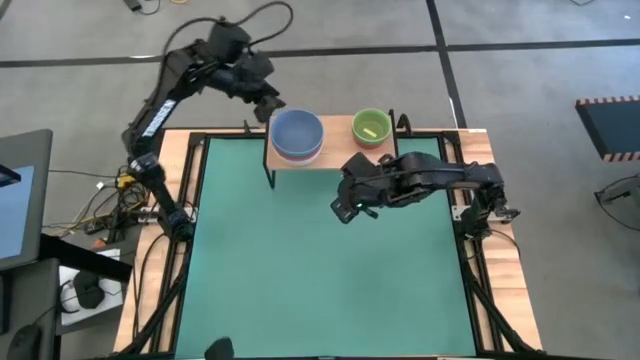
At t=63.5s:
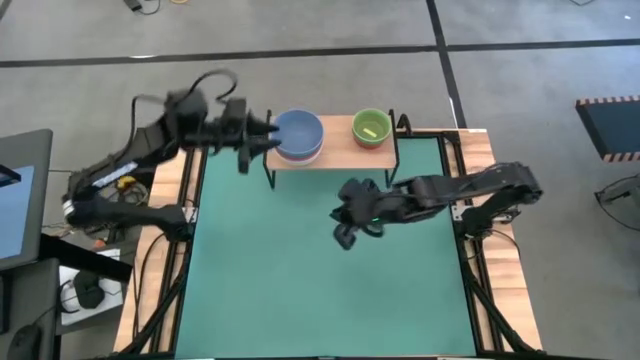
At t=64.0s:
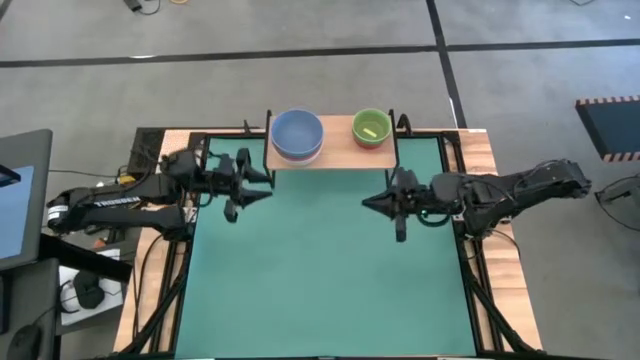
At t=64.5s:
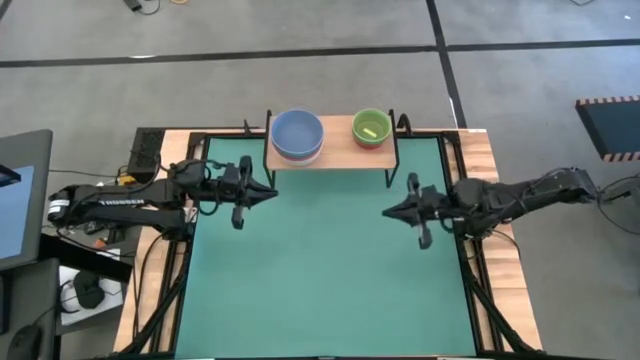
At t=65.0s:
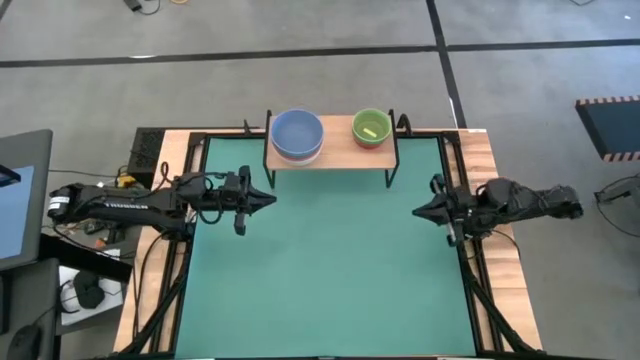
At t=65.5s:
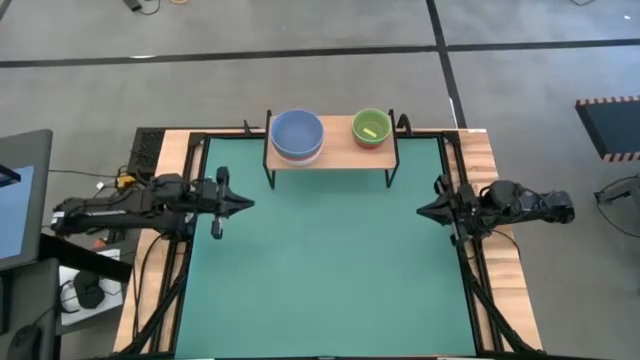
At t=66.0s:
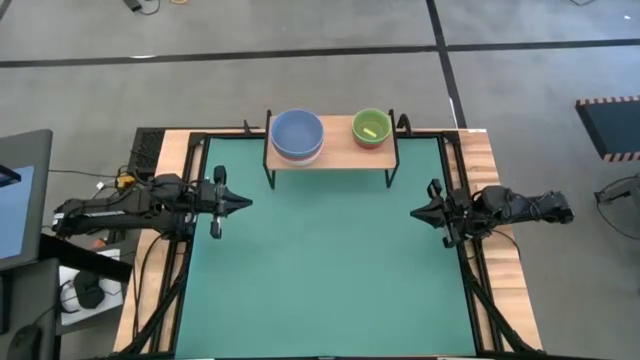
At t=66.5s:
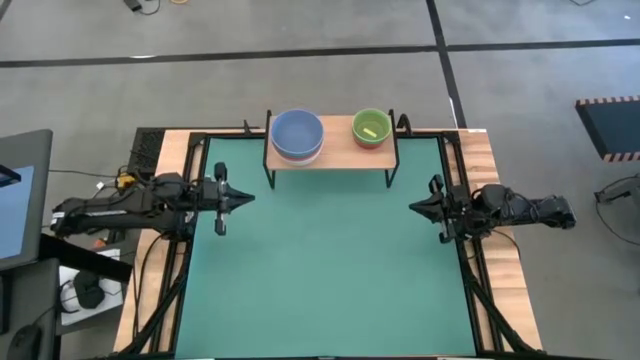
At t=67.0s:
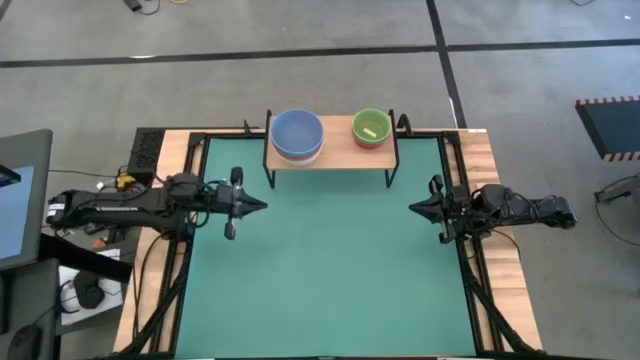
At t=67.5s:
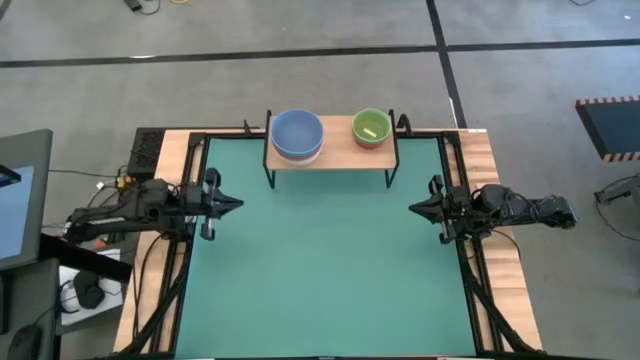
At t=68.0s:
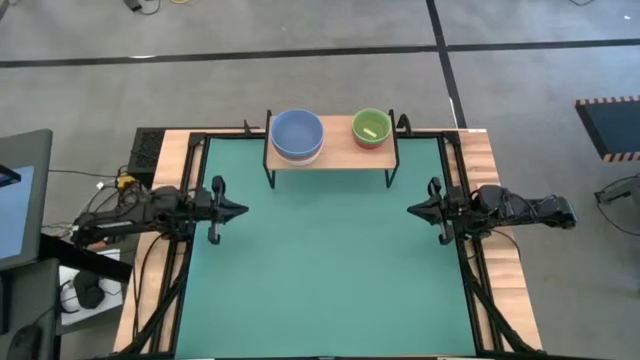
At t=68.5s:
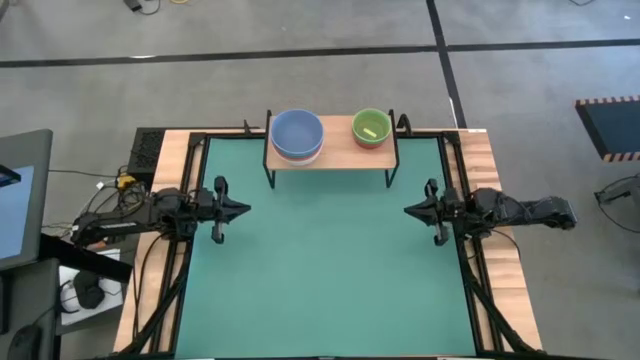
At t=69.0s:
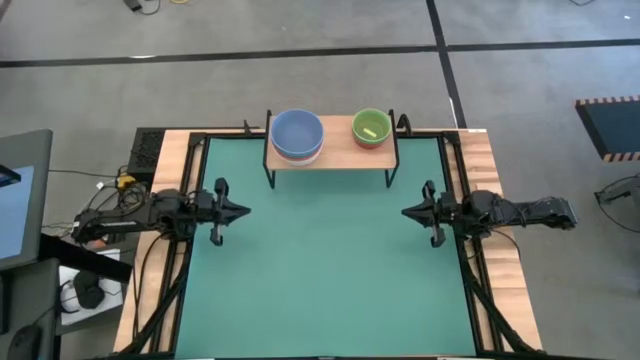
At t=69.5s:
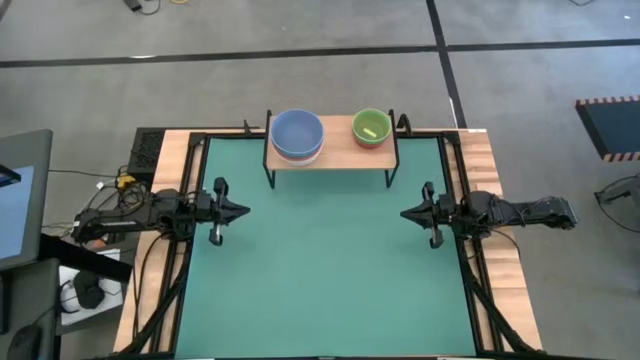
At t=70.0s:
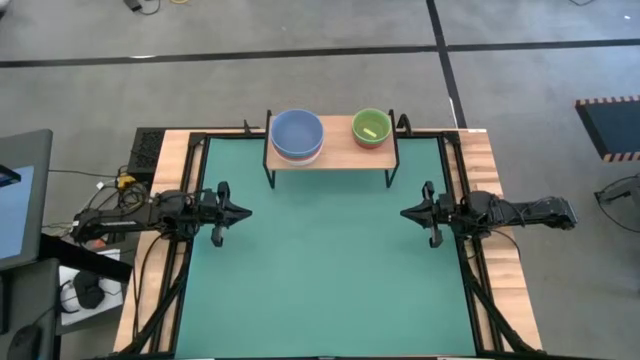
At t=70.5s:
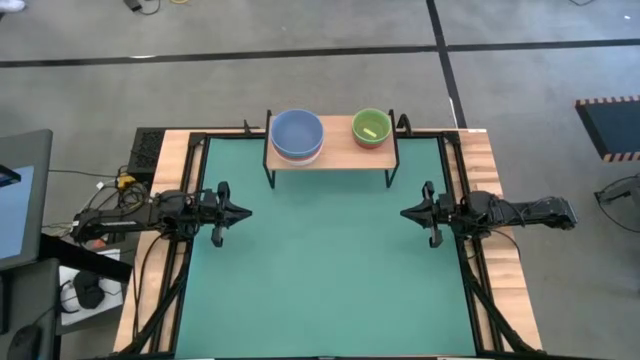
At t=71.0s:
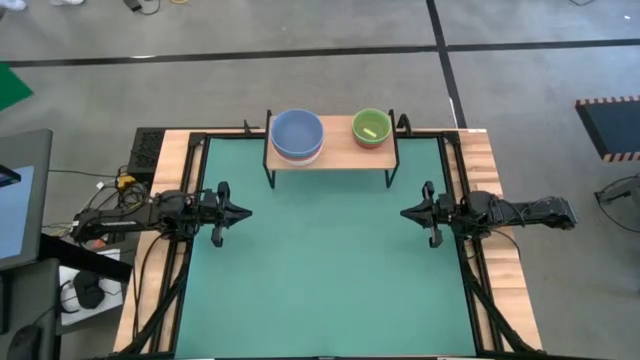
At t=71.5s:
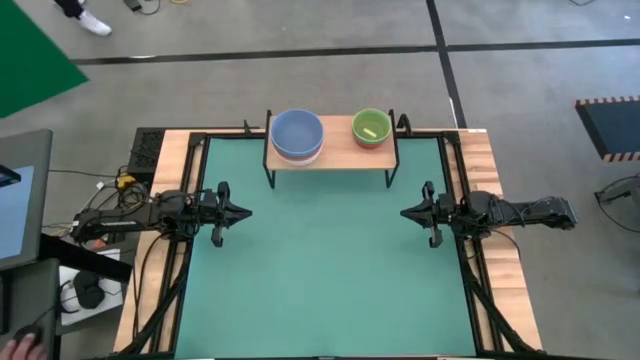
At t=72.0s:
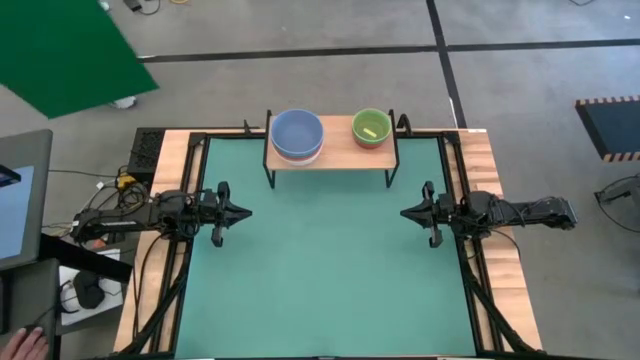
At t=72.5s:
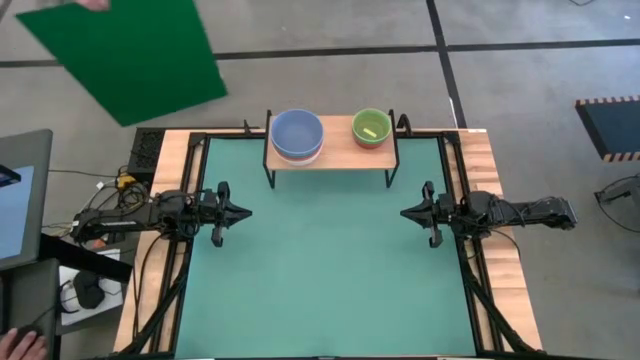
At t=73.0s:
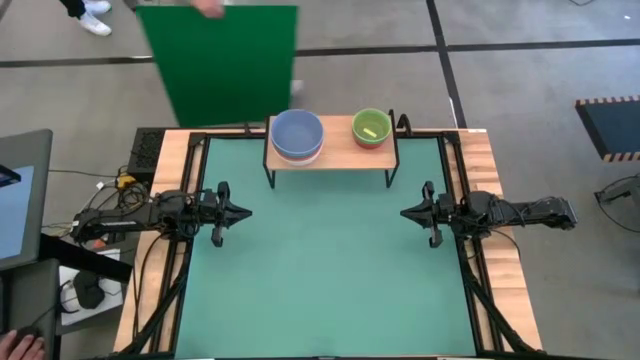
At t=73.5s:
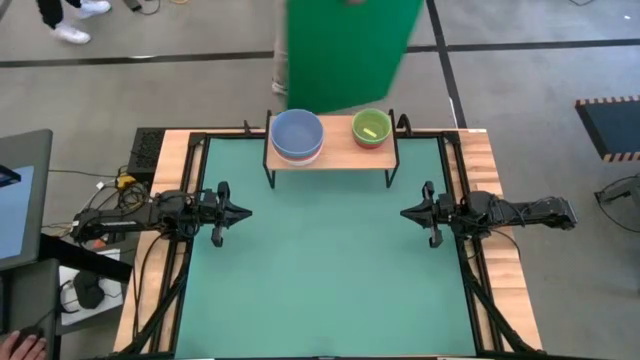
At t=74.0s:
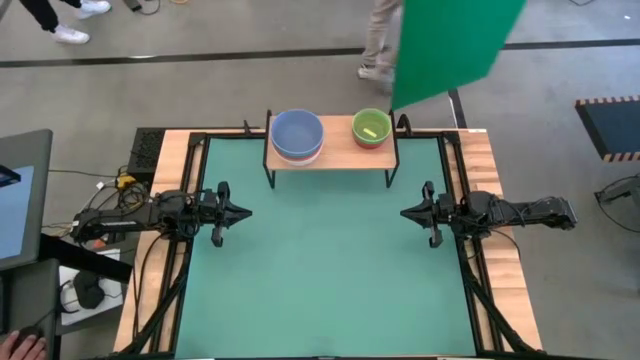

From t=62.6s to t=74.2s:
Task: Place and stack bowls onto a shelf
Return to Home Position

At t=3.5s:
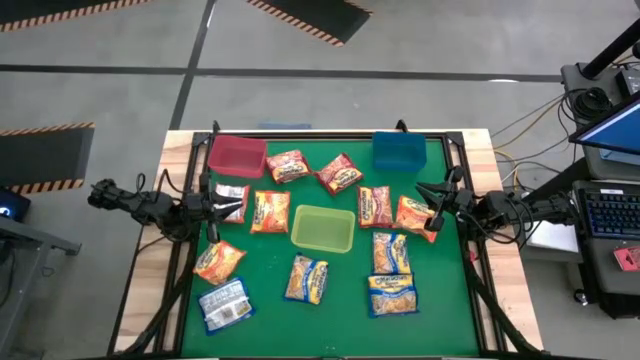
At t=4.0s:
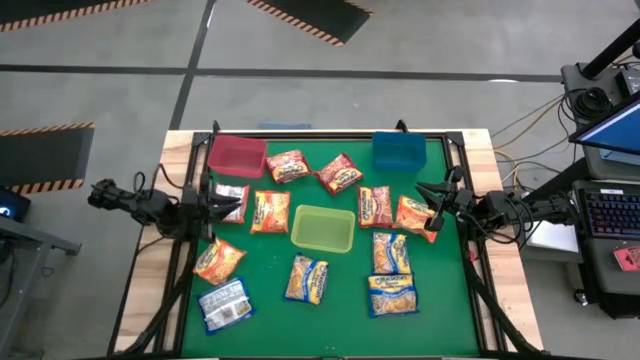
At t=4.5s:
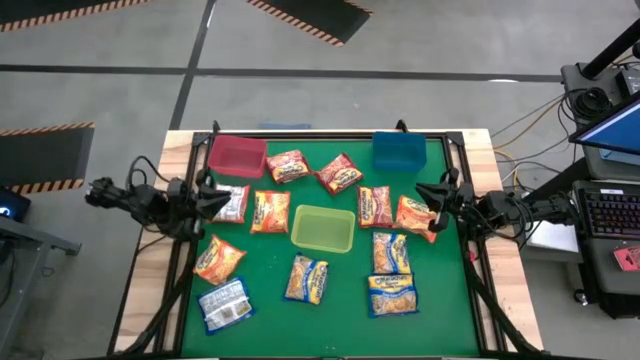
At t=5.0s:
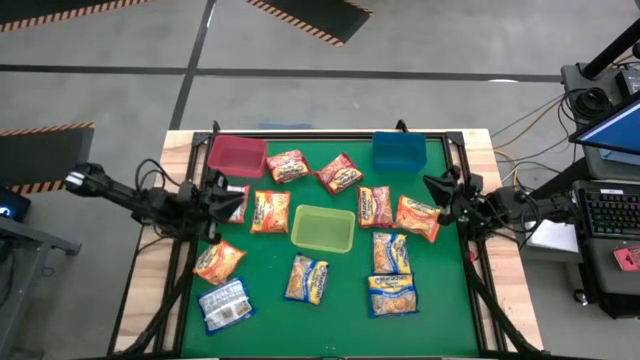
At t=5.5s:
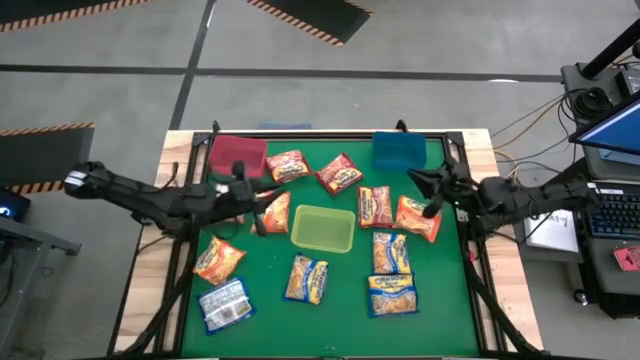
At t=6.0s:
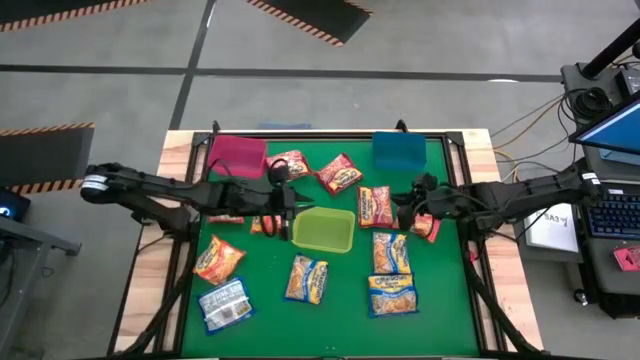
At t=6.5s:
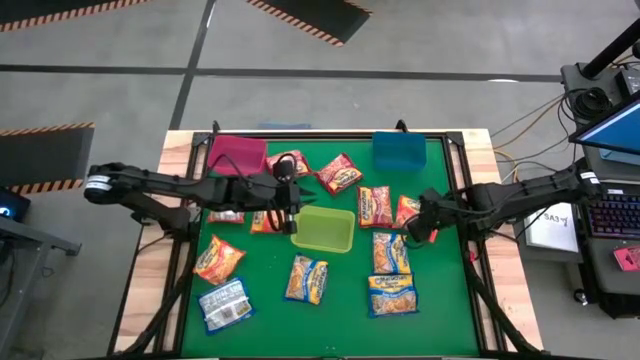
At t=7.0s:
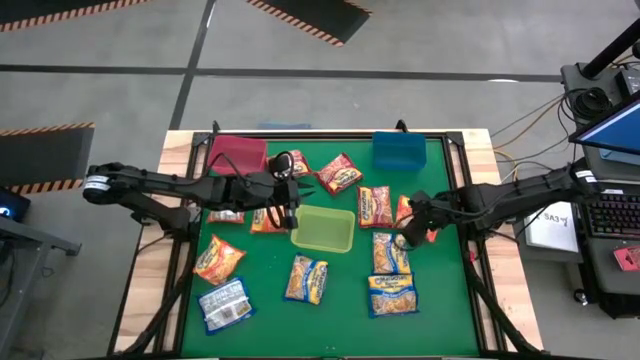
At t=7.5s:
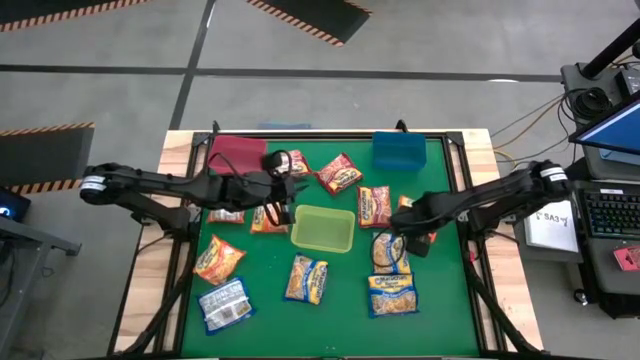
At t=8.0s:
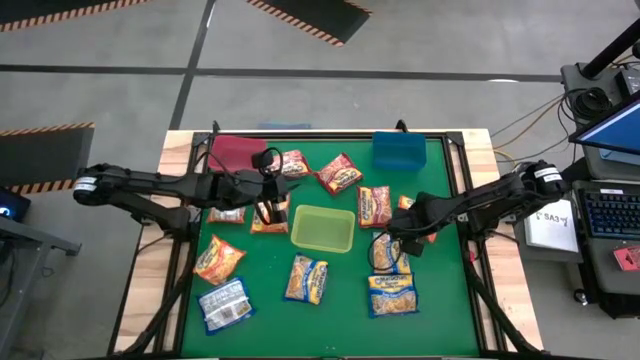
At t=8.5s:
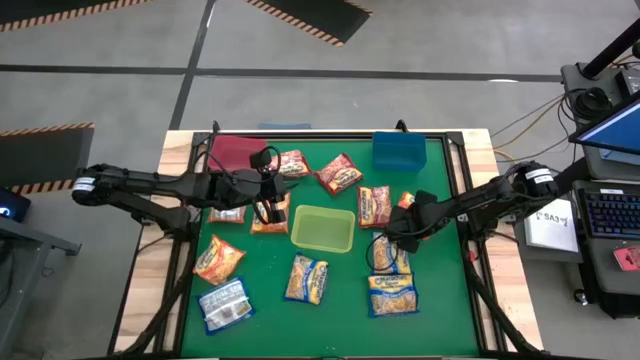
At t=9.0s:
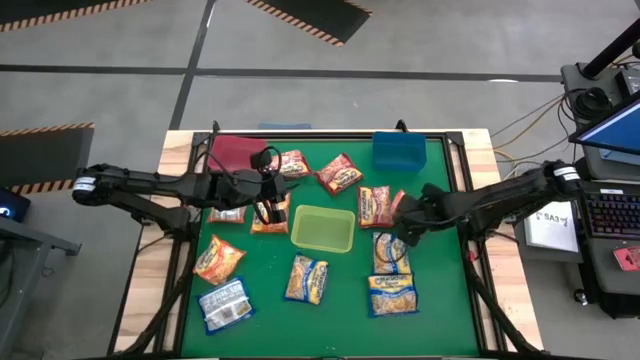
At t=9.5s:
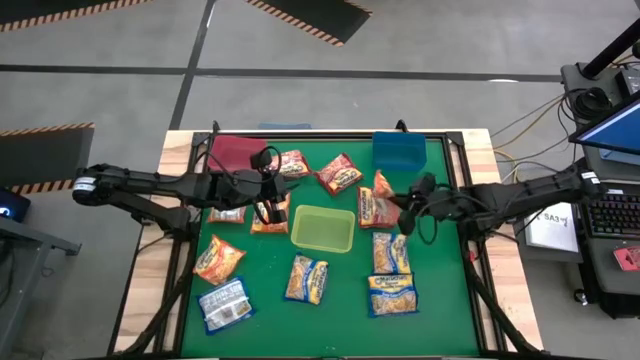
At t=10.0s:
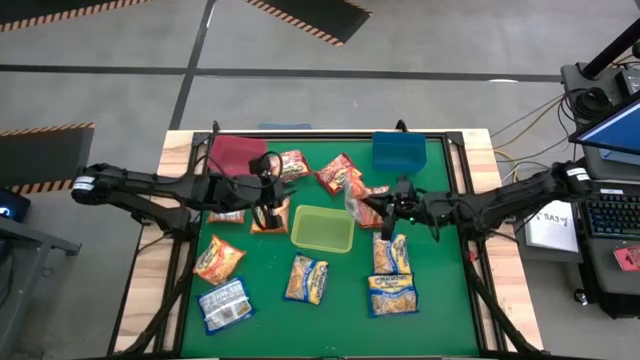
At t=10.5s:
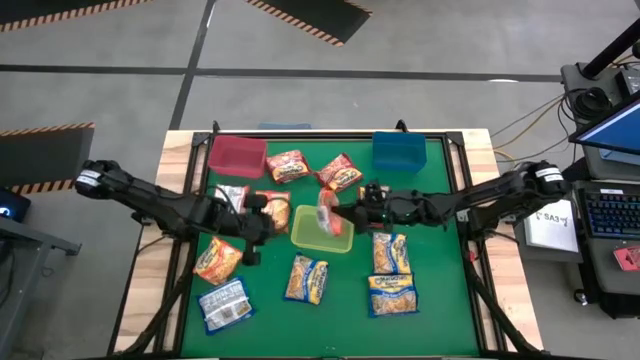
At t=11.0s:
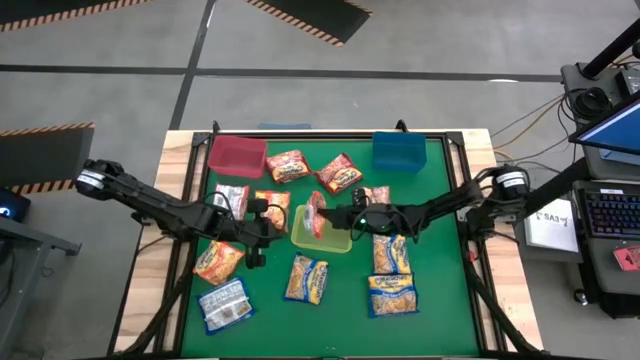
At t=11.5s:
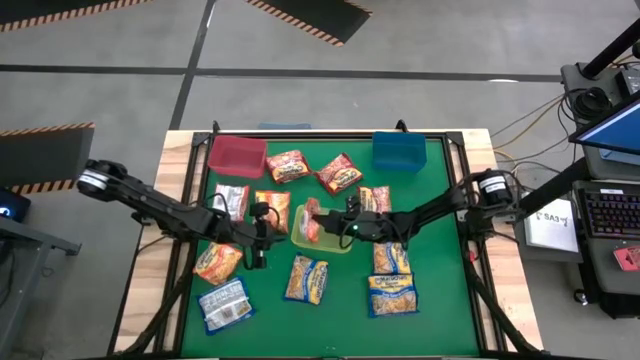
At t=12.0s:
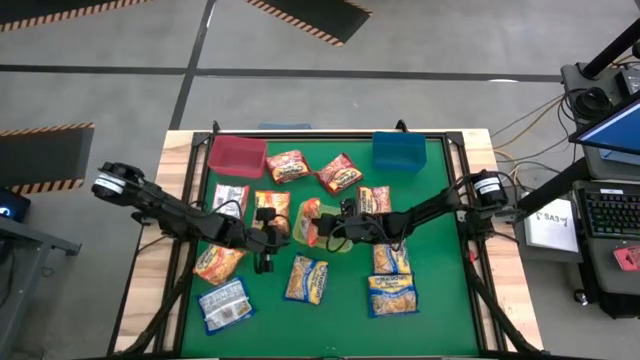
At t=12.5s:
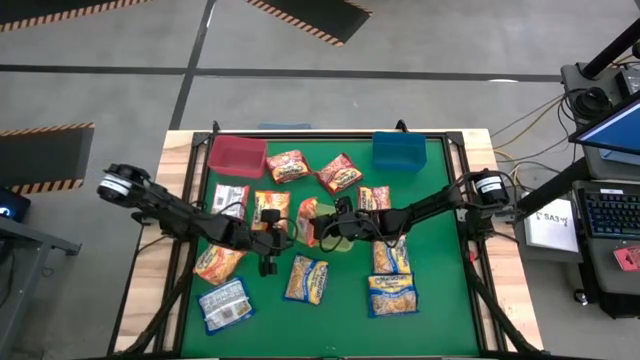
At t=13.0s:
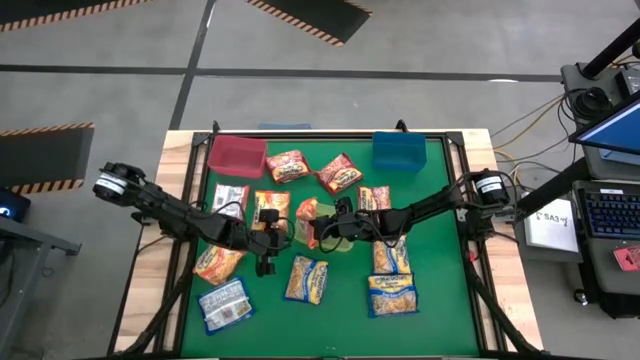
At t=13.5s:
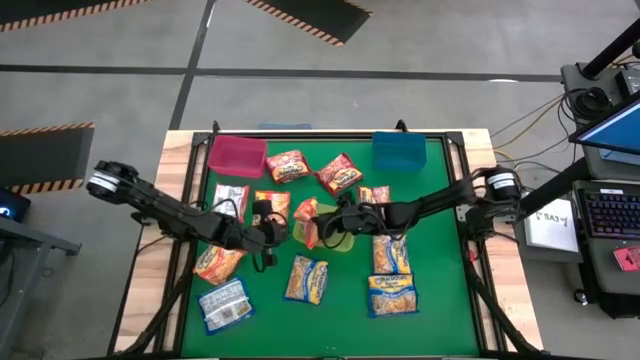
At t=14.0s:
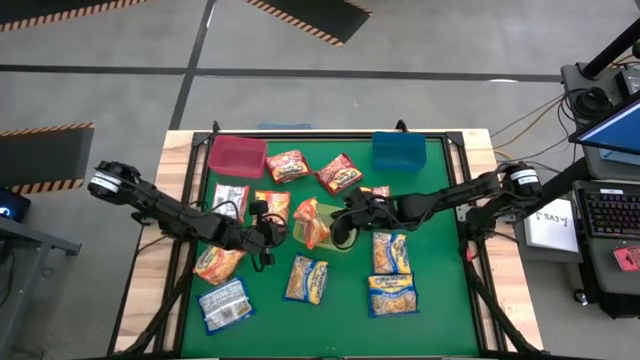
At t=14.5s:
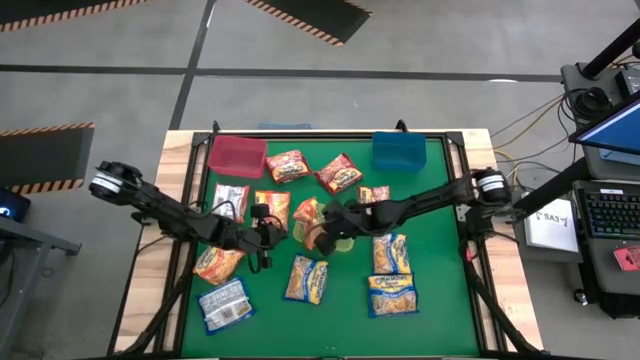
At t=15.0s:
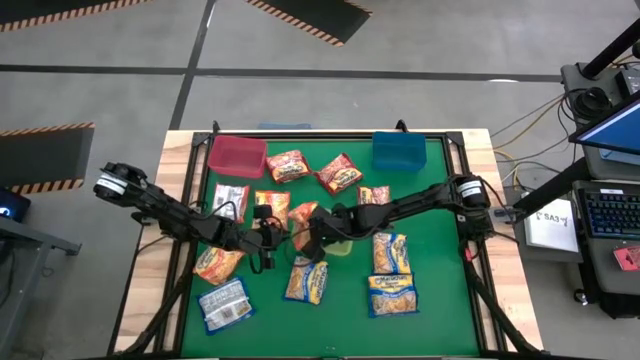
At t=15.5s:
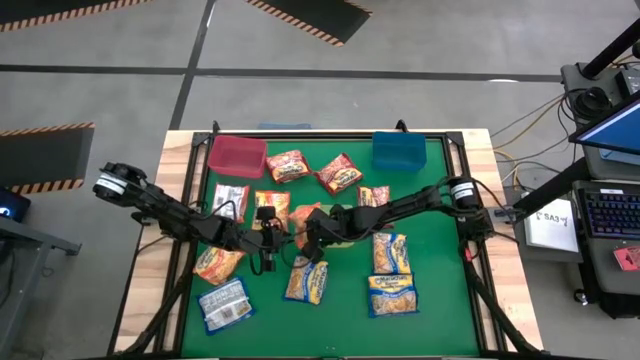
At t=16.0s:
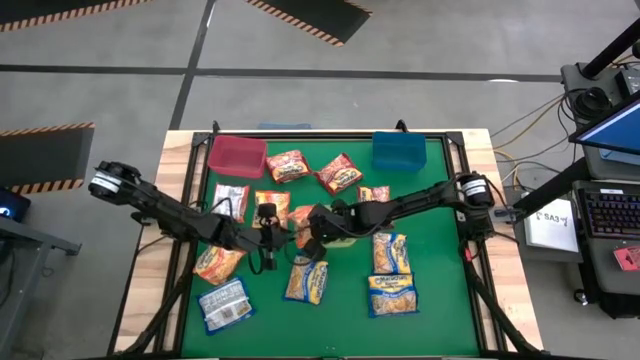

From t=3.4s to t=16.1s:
Task: Sort Maruchan noodles
Put the orange noodle pack into the yellow bin
